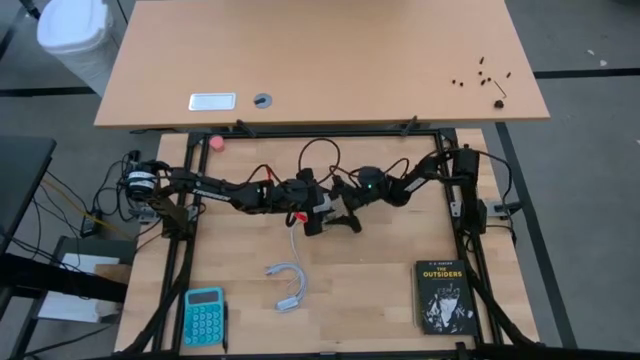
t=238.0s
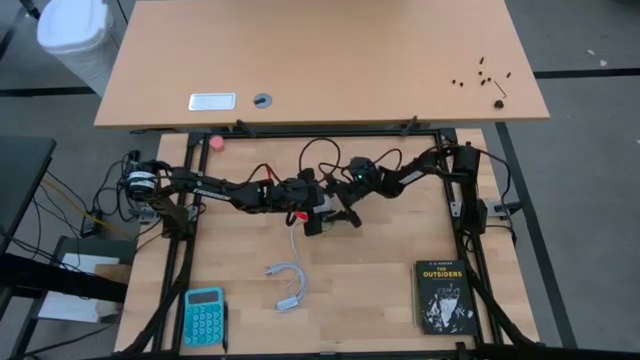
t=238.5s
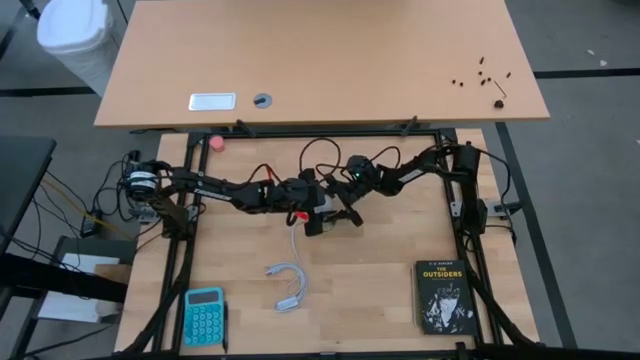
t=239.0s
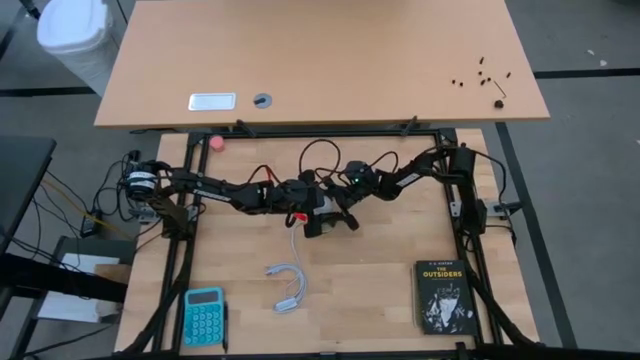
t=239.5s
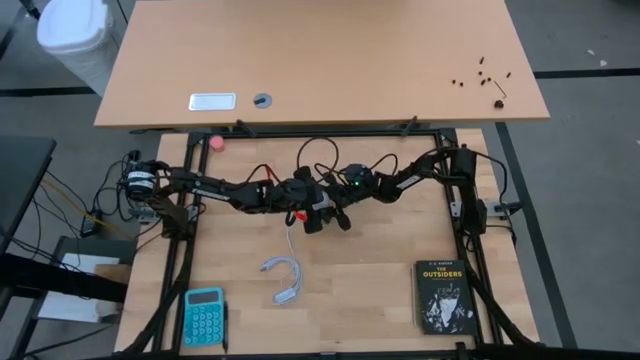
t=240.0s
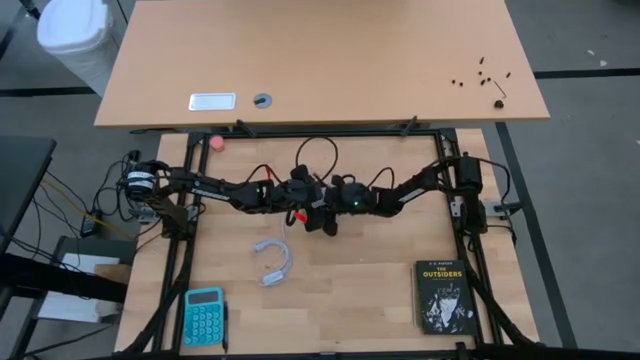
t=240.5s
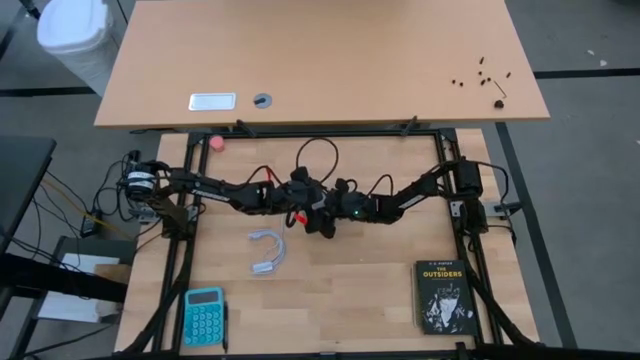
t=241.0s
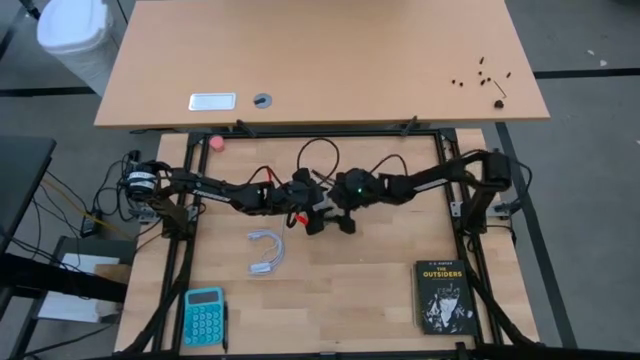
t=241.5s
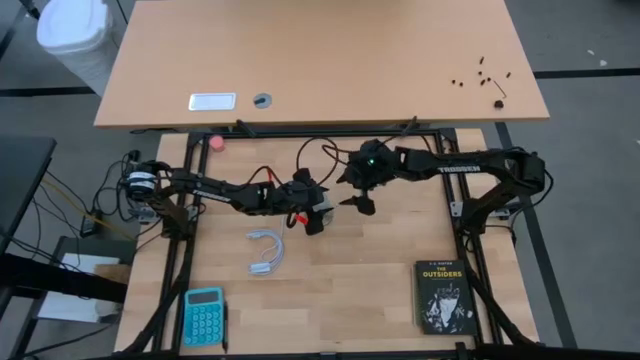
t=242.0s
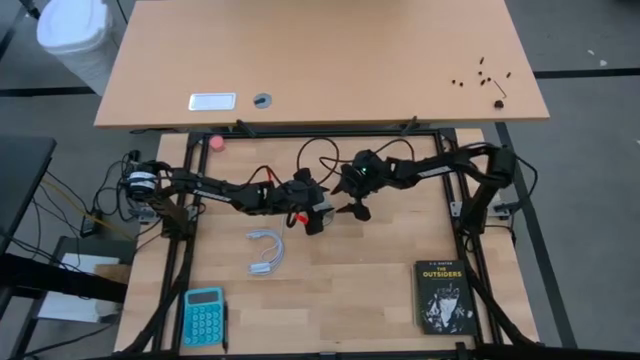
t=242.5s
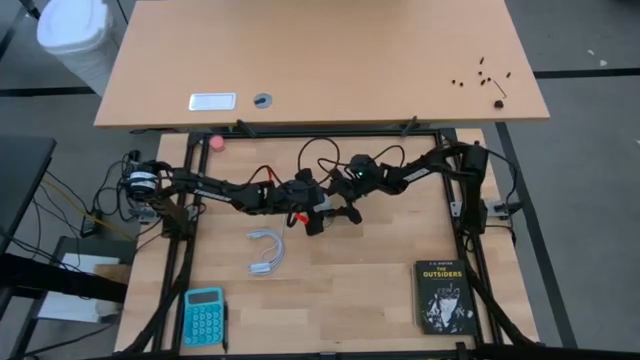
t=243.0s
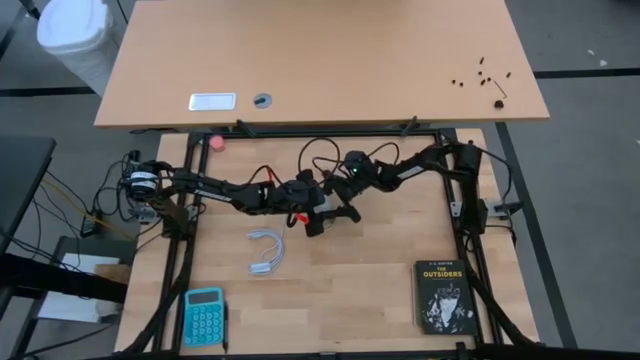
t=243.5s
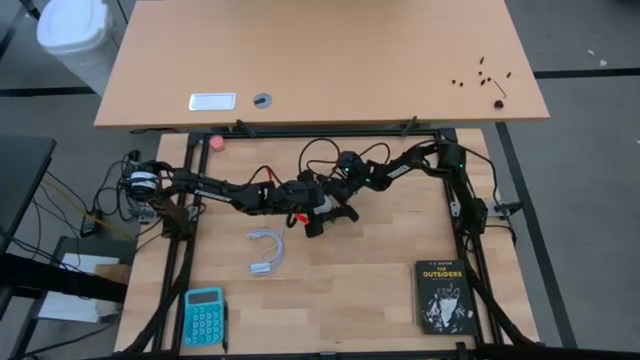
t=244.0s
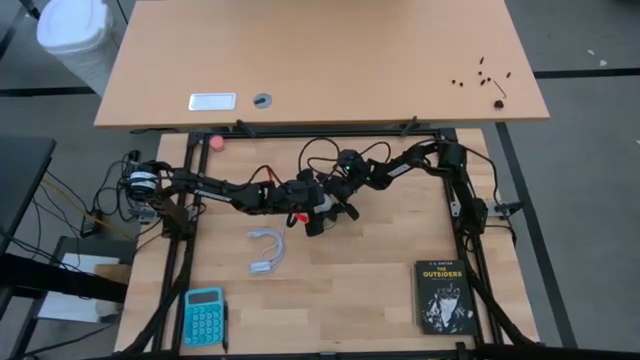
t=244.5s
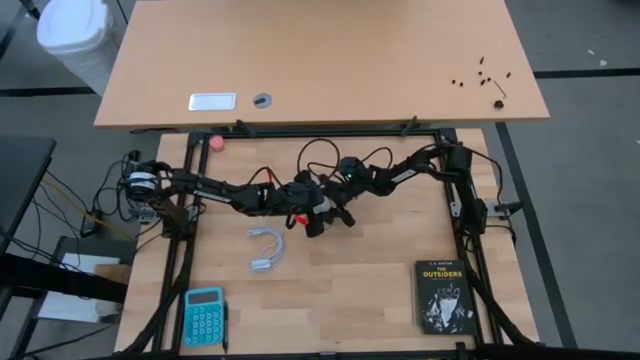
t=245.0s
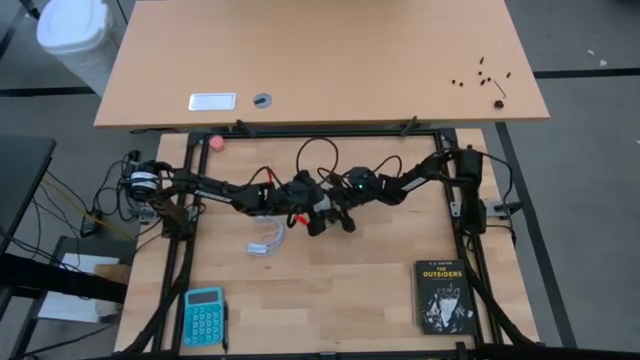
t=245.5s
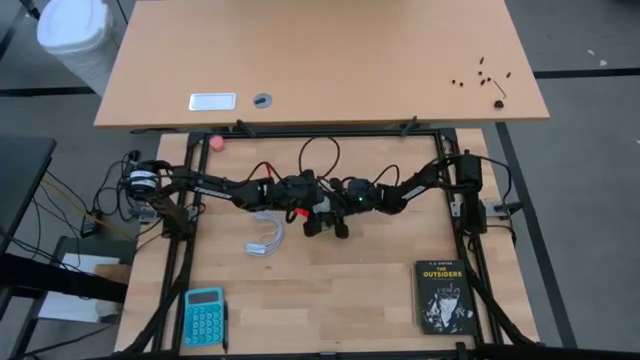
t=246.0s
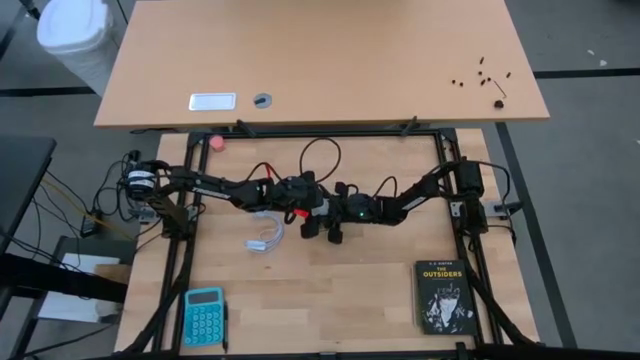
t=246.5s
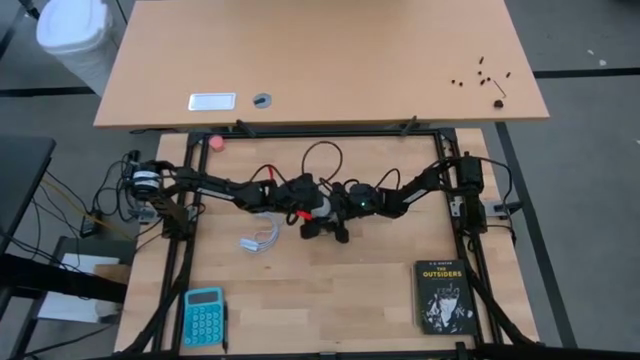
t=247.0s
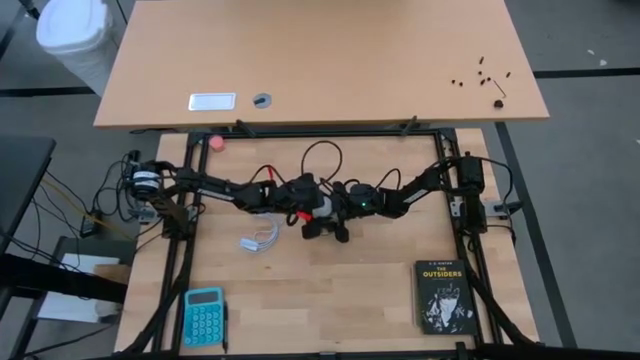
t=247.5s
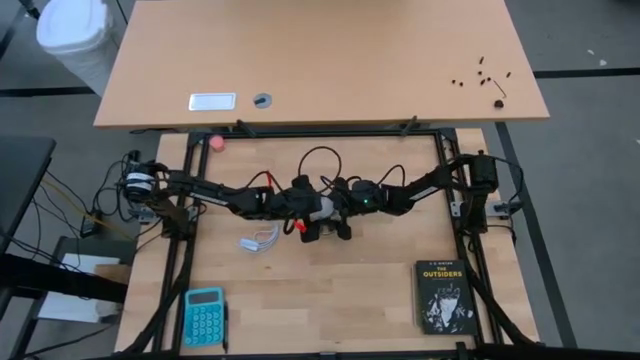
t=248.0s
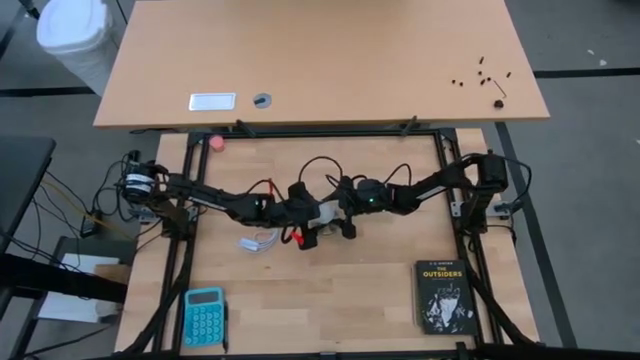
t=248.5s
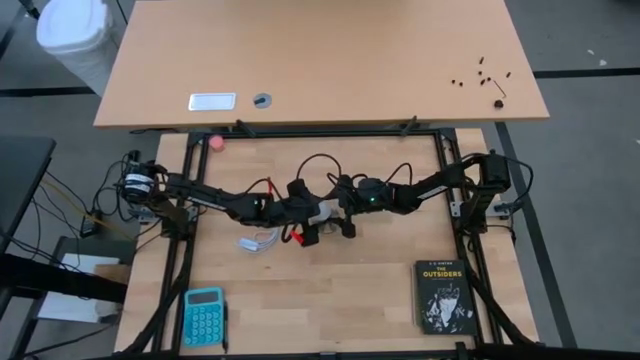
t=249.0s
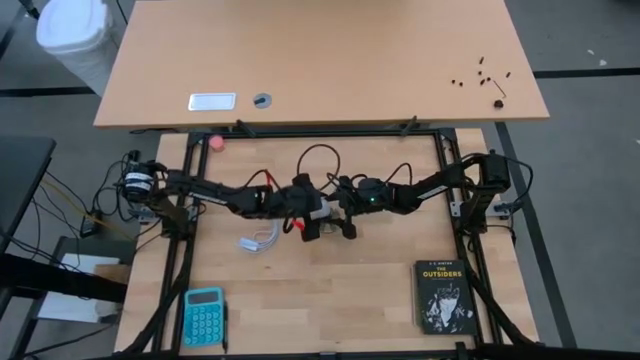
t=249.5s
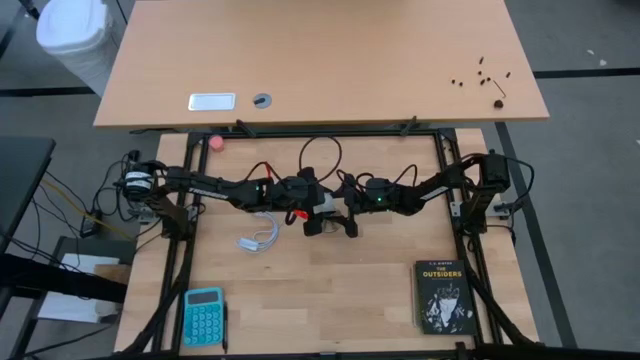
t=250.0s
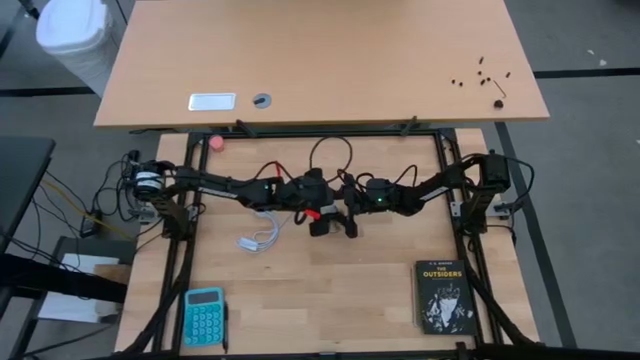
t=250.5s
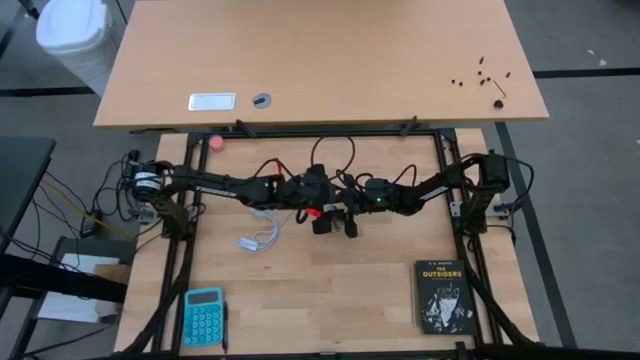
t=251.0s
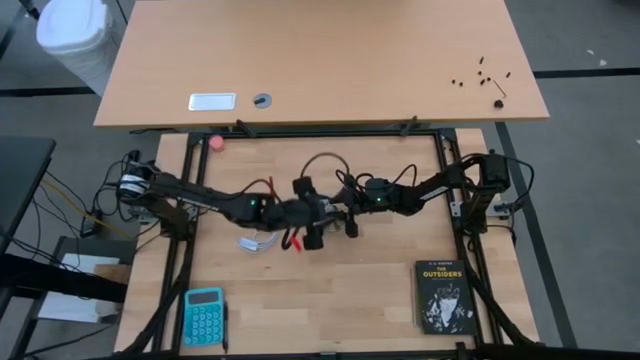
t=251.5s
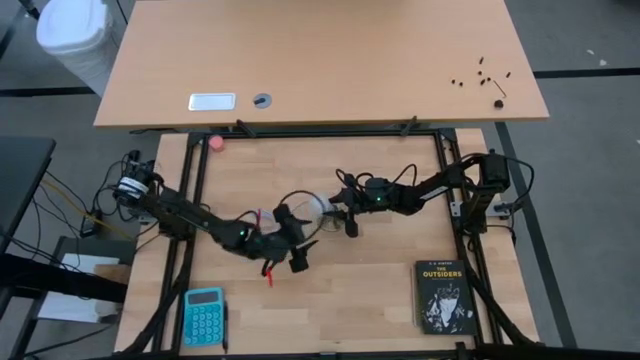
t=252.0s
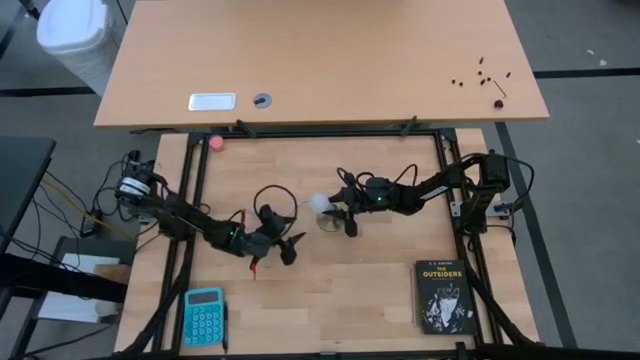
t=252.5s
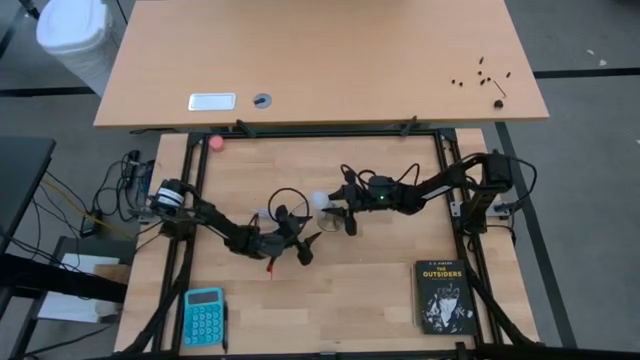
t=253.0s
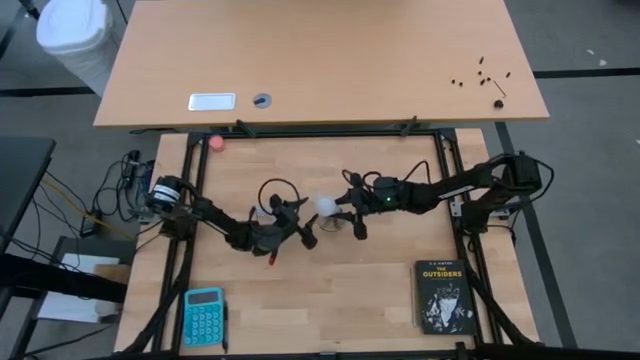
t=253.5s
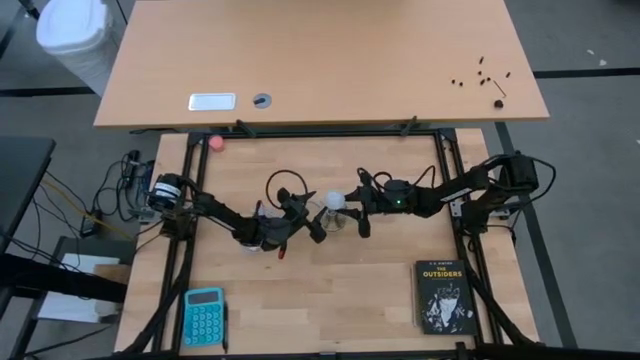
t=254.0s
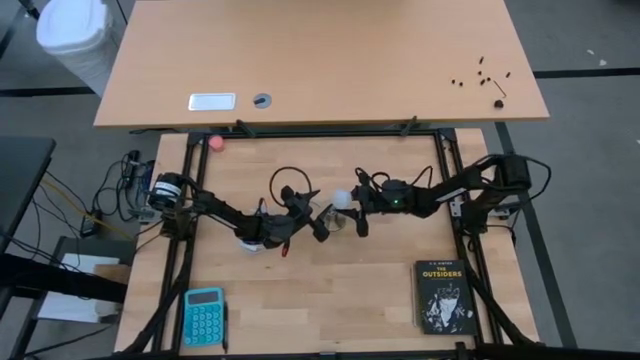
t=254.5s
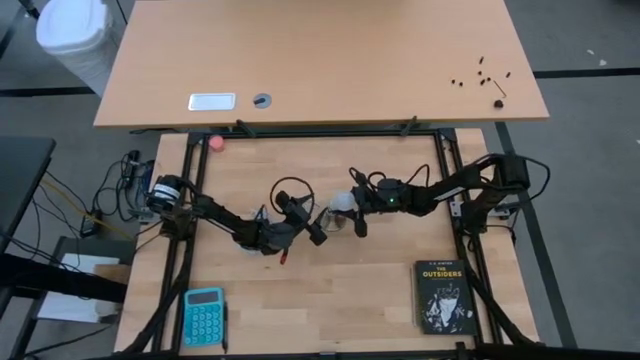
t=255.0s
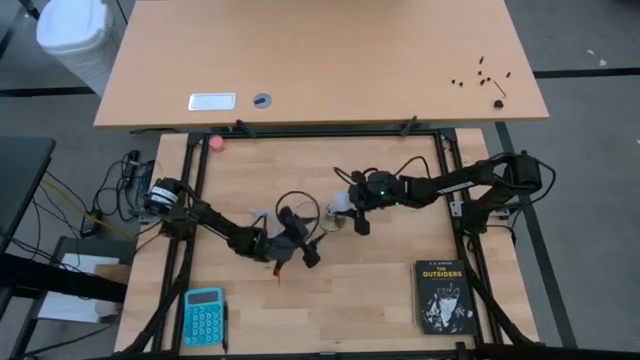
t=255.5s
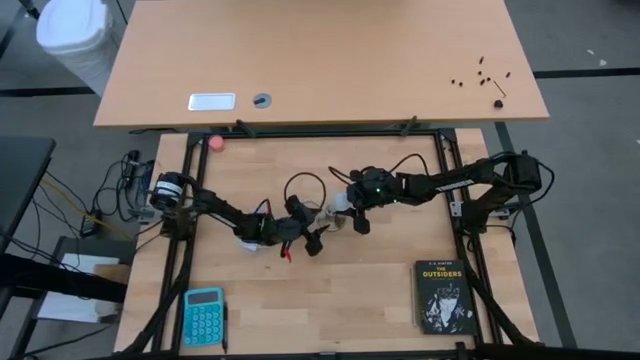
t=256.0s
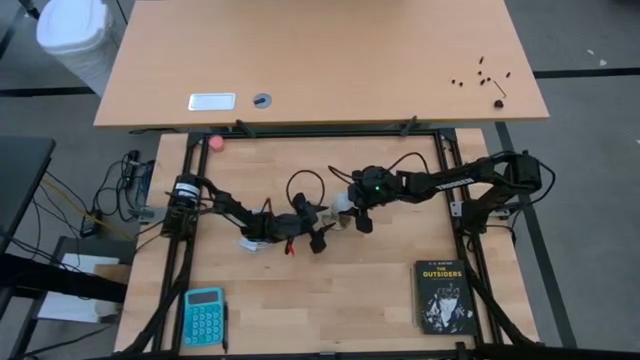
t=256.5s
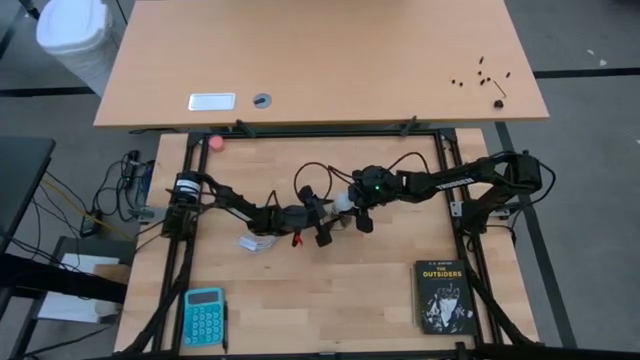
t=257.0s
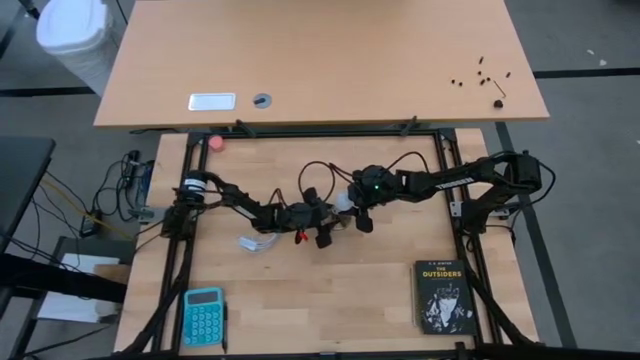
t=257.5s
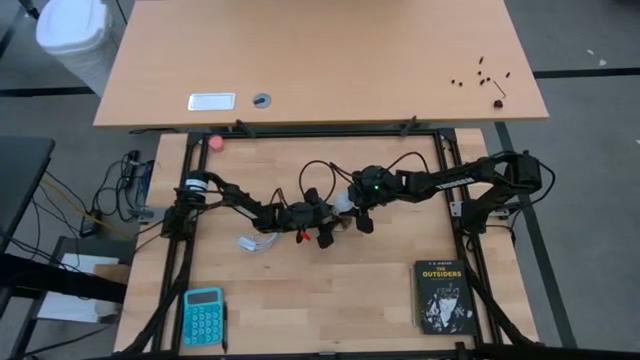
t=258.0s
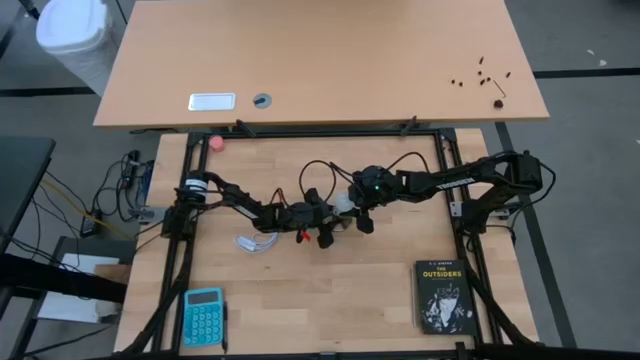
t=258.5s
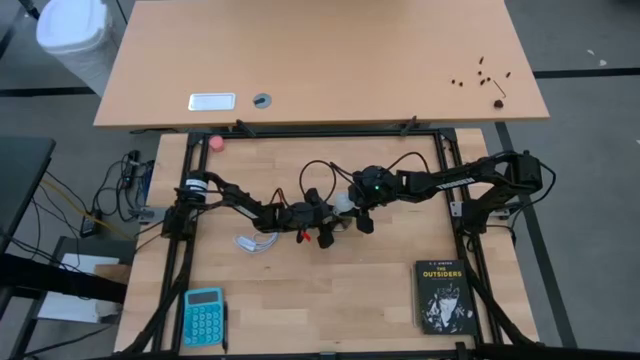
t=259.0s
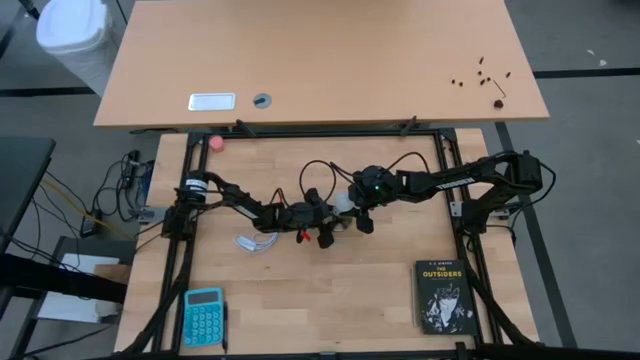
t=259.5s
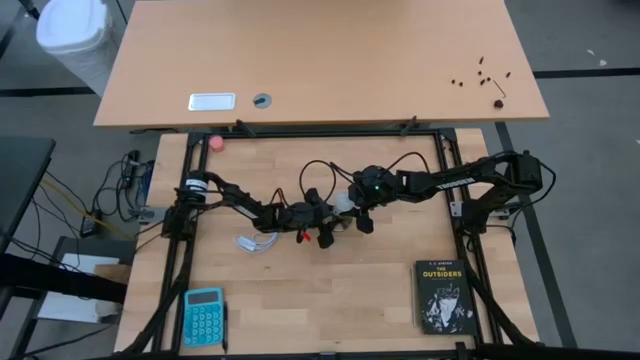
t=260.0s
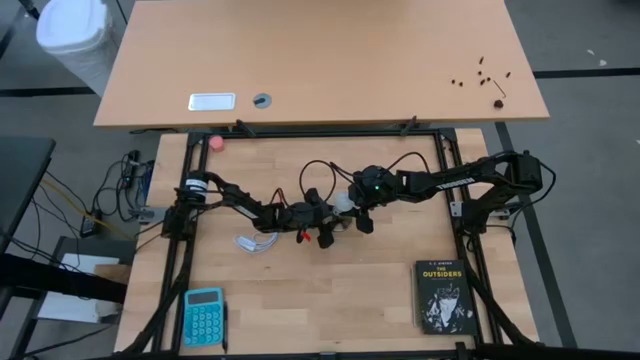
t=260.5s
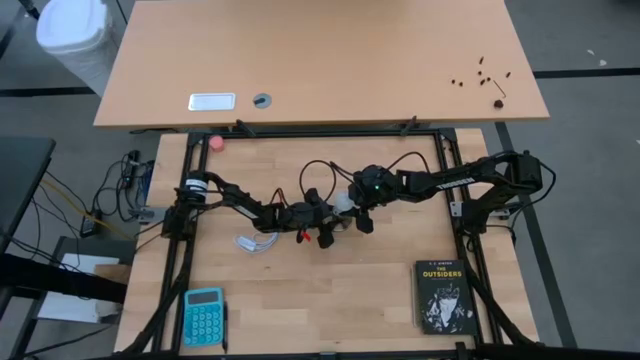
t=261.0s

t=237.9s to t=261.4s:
Task: Screw lightbulb
Insert the white lightbulb into the silver lamp
